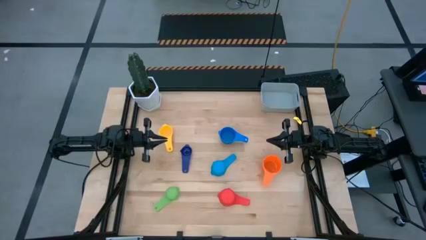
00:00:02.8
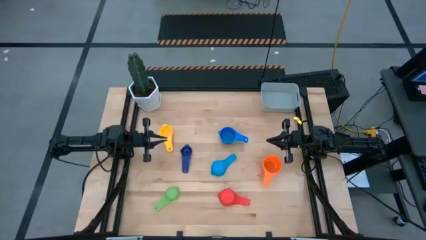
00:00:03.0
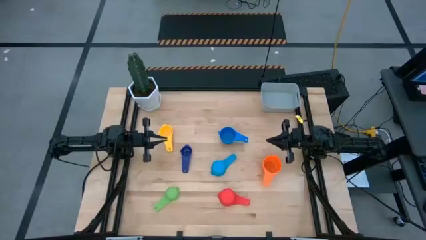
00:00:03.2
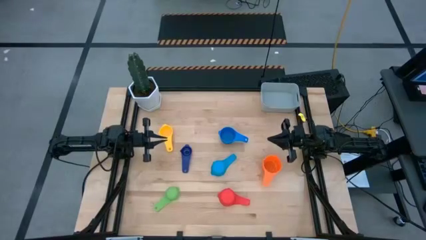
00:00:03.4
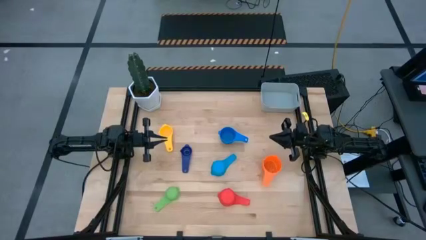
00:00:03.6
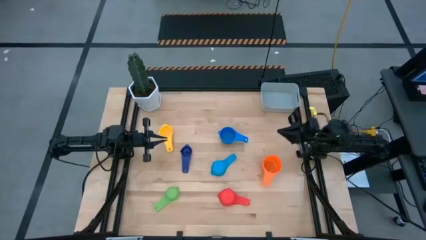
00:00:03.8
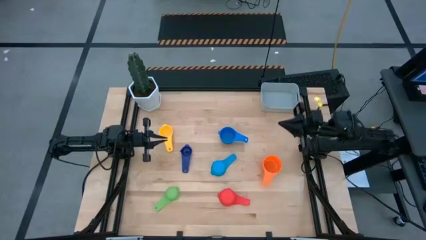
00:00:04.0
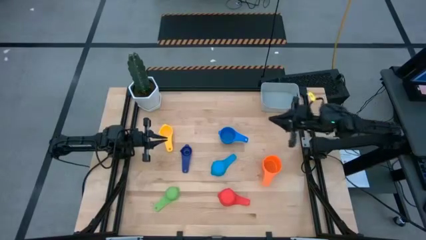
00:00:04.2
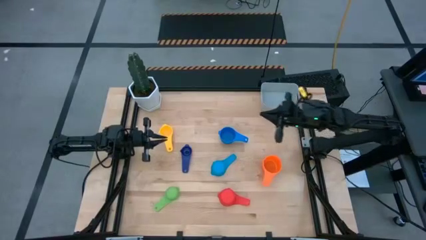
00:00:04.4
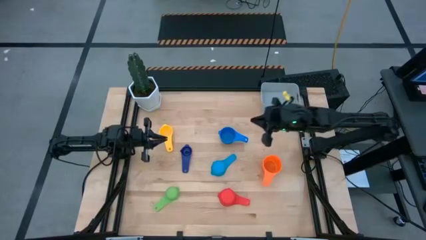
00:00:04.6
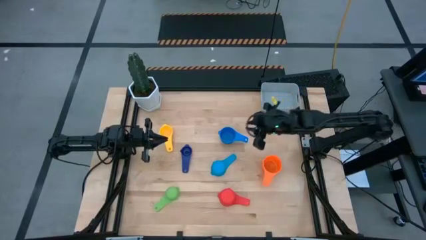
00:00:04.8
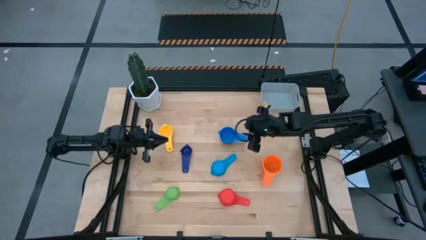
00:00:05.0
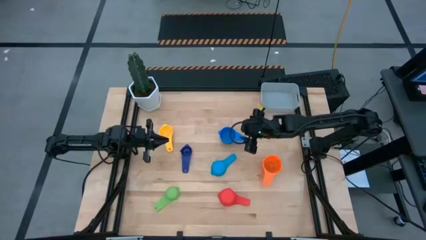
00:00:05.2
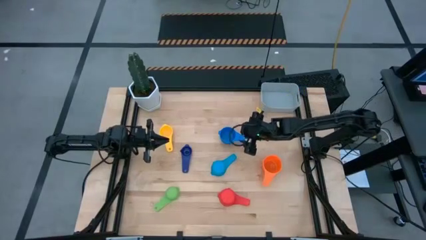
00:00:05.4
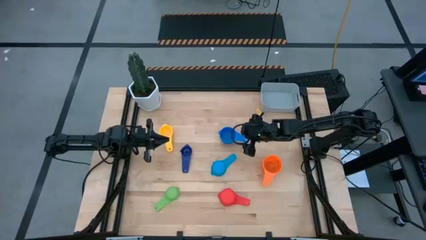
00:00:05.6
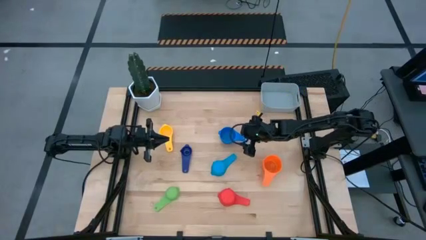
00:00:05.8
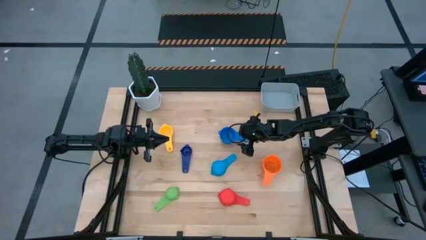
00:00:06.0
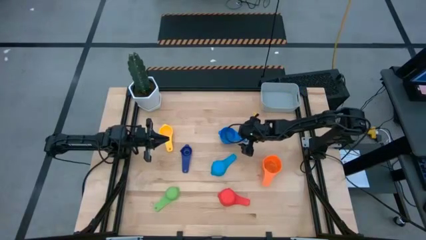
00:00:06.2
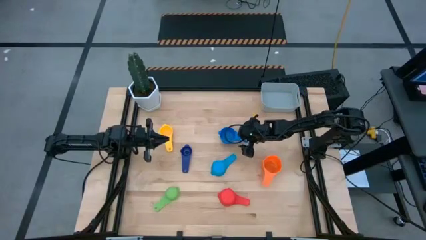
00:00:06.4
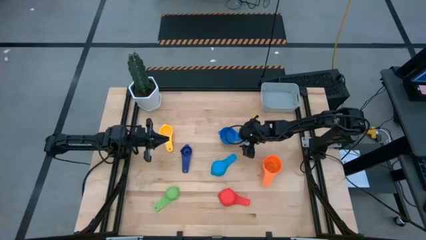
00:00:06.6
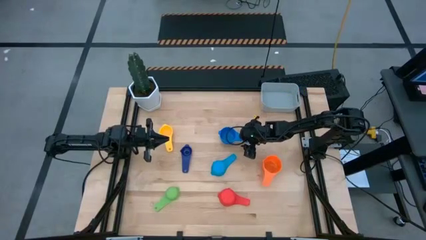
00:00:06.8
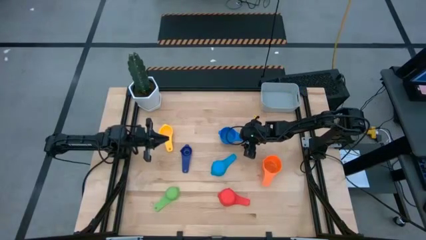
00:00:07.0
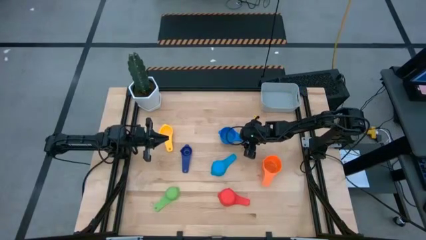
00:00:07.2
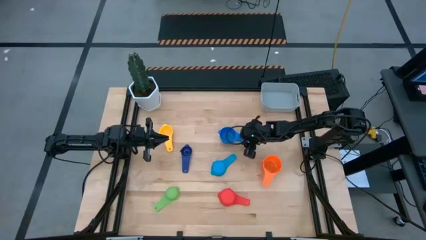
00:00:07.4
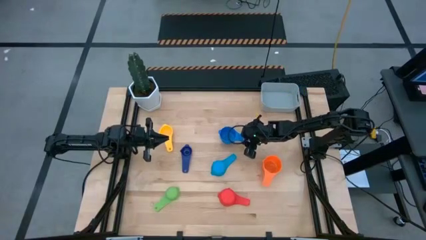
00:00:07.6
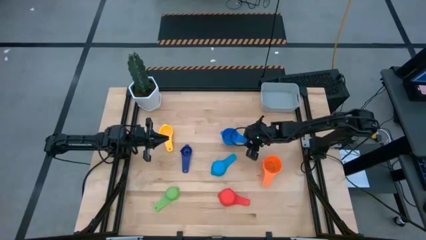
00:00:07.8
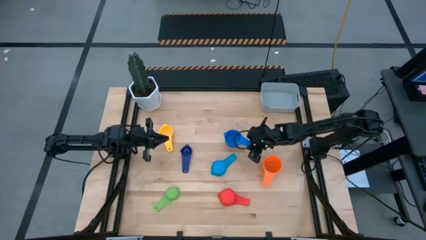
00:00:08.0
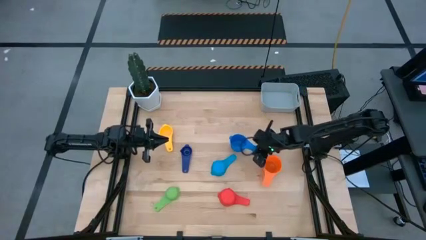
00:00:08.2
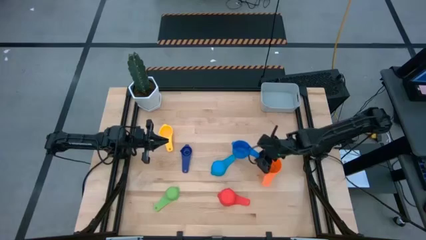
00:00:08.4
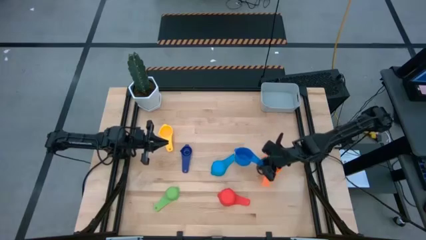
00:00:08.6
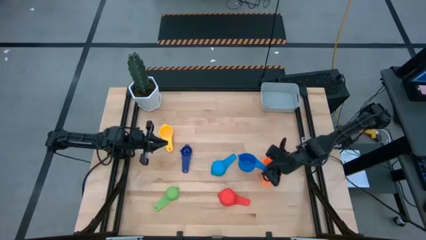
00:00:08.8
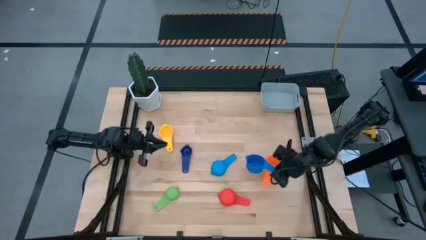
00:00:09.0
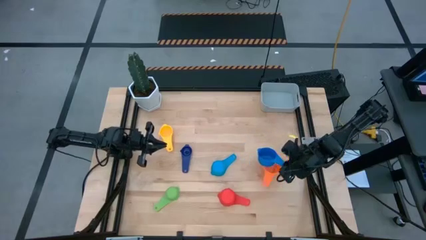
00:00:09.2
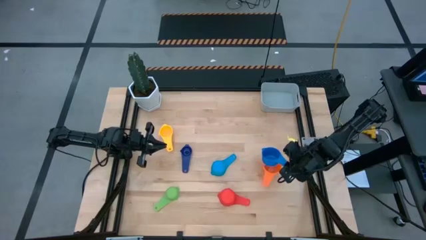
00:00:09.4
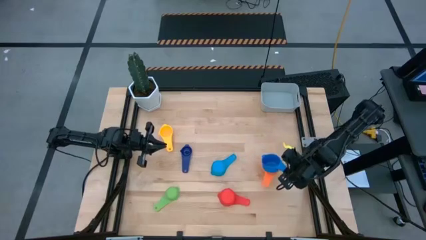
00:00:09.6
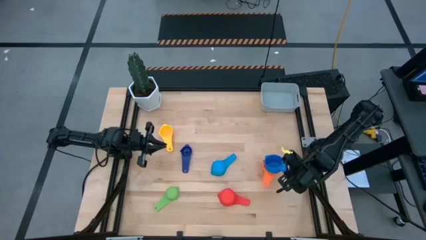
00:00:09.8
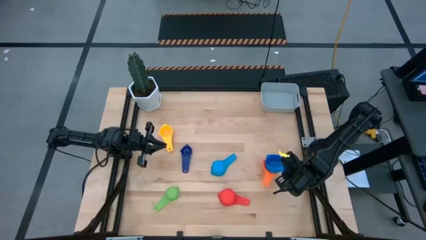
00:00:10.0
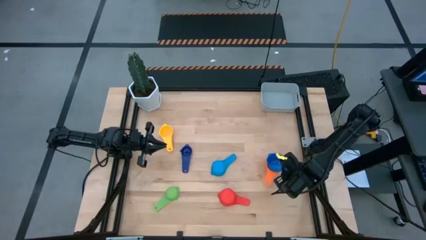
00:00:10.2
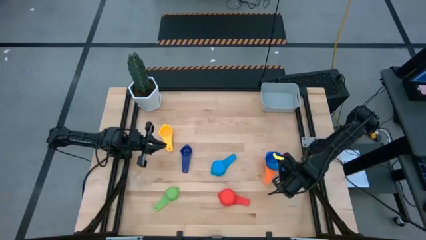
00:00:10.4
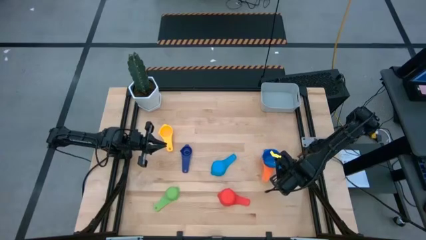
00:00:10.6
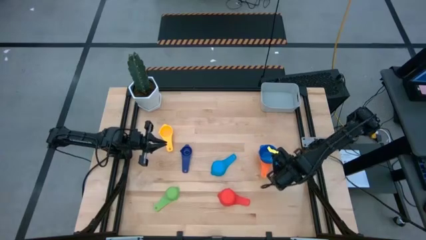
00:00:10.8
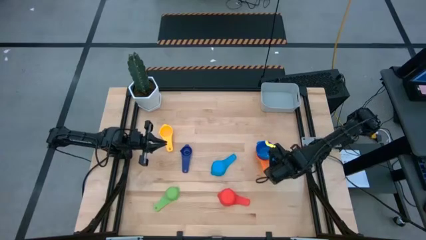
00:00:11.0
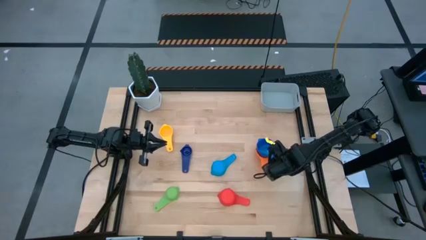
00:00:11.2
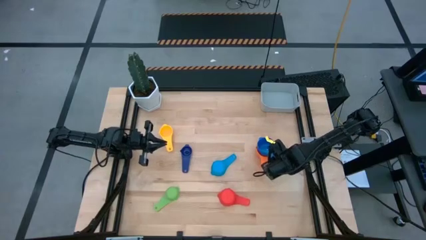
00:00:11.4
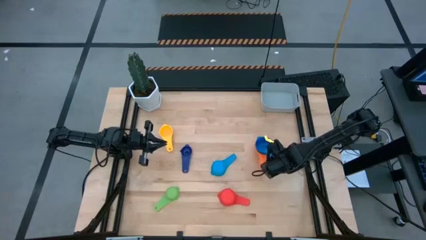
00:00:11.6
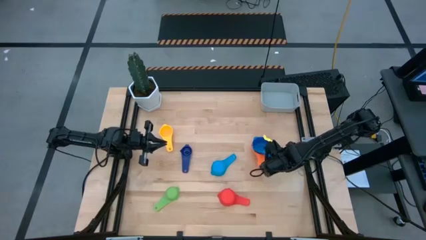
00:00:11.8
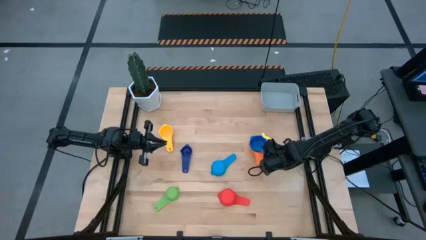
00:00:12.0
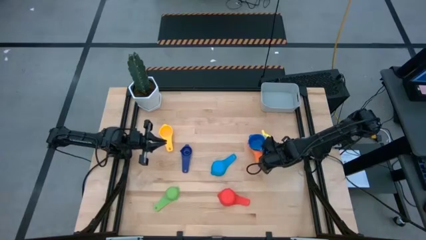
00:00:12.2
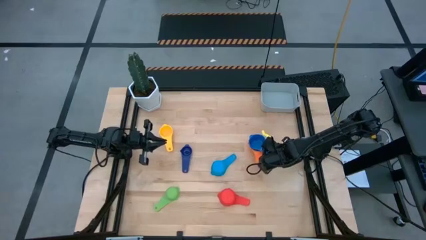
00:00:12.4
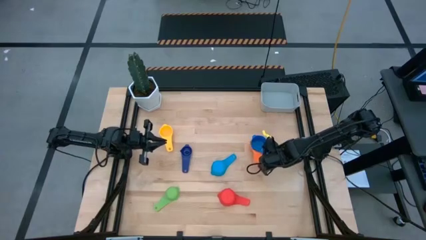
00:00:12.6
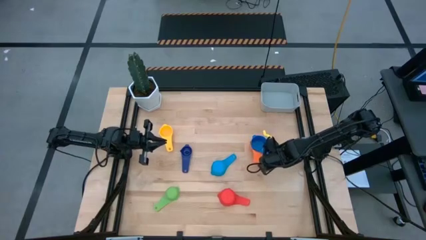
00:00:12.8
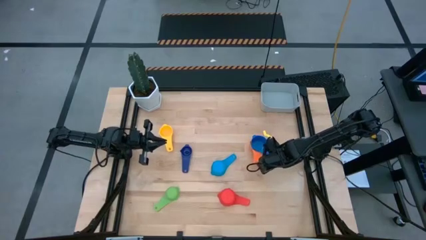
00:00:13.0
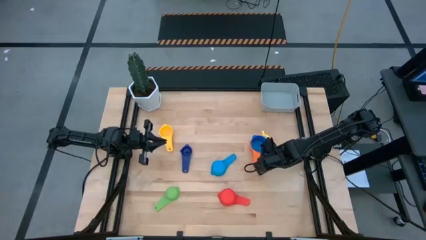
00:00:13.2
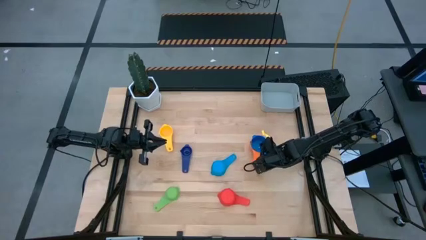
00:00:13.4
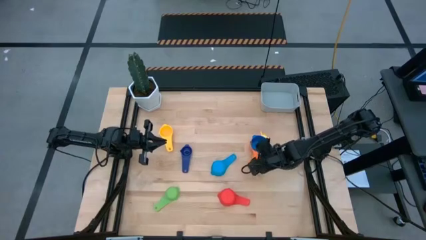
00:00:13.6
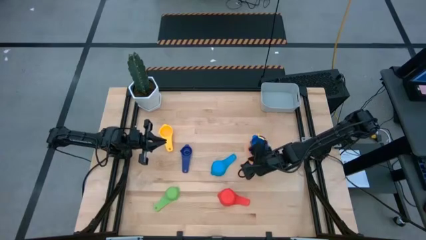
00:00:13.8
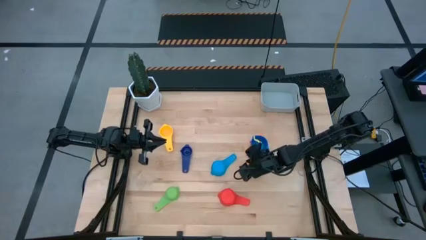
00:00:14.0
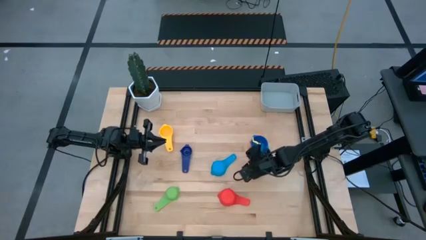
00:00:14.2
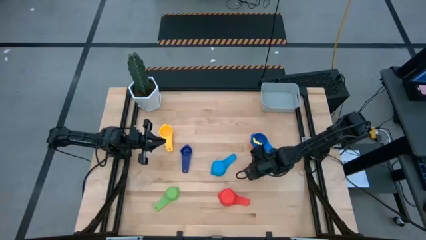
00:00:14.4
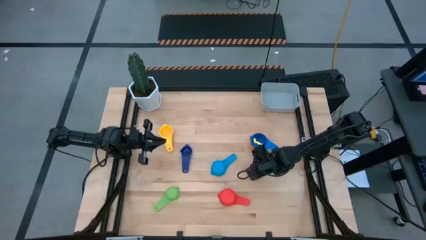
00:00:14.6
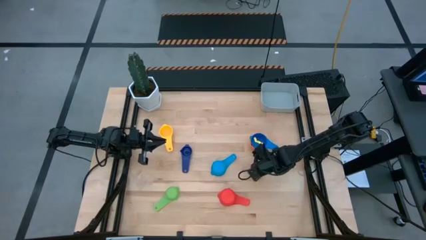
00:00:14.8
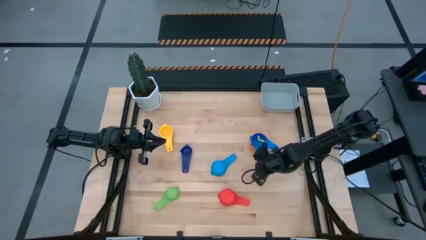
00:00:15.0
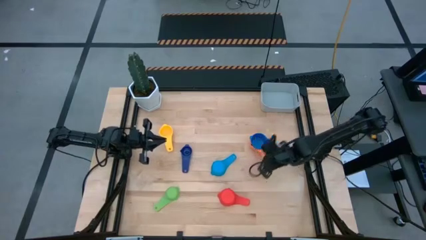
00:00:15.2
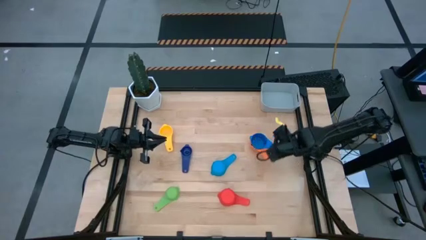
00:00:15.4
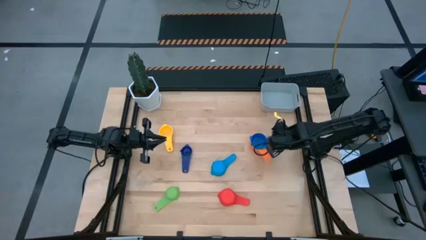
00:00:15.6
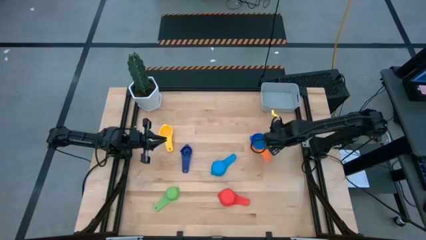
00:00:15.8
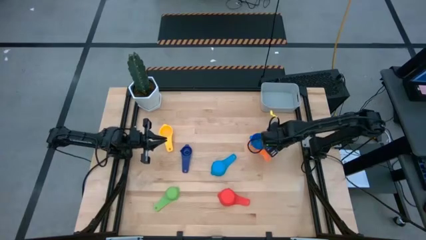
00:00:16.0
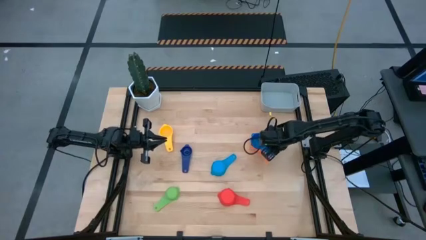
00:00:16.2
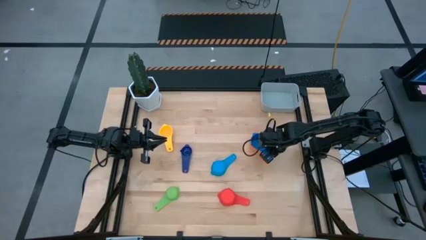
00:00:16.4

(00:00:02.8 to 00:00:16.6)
Task: Nest measuring cups in basket
Stack the blue measuring cup on top of the orange measuring cup
